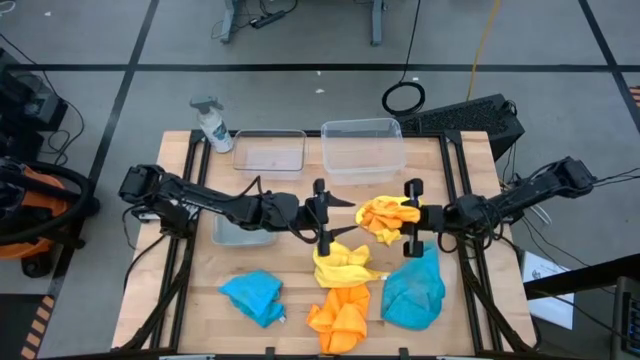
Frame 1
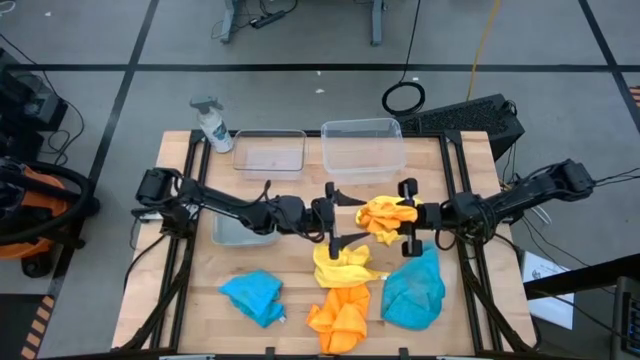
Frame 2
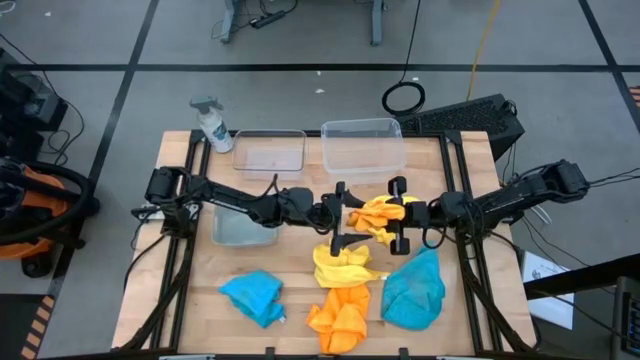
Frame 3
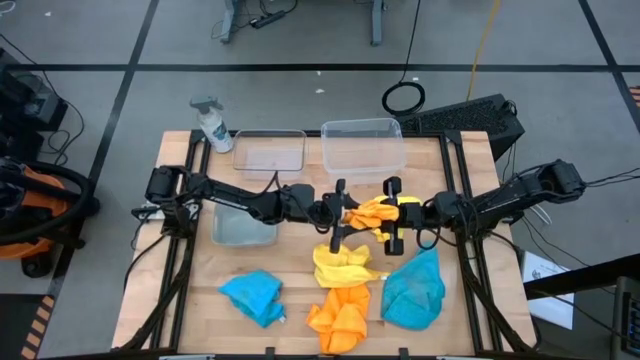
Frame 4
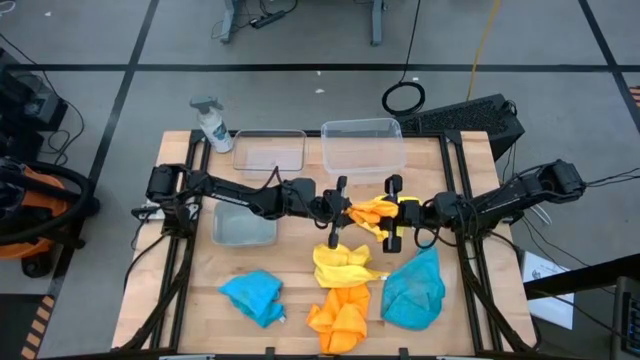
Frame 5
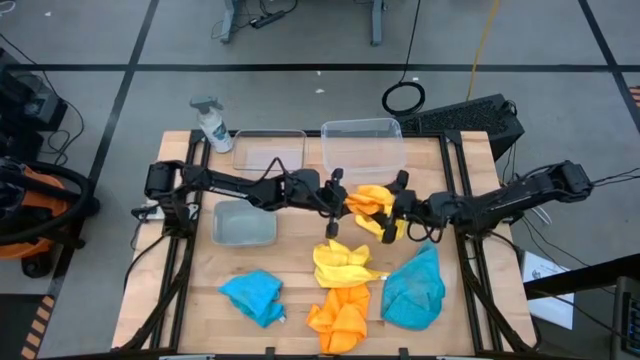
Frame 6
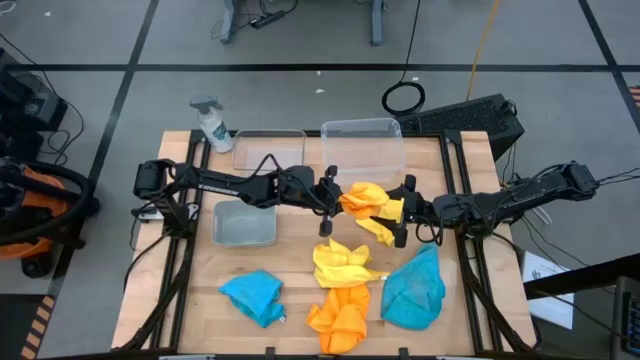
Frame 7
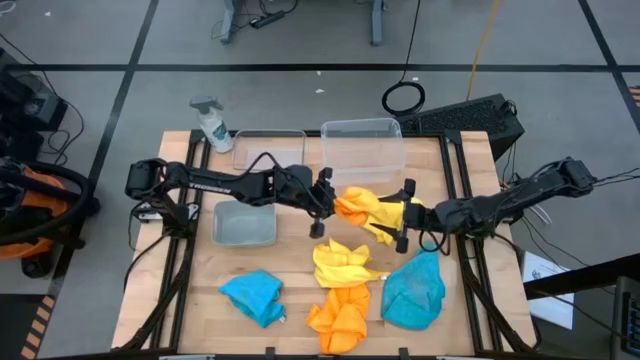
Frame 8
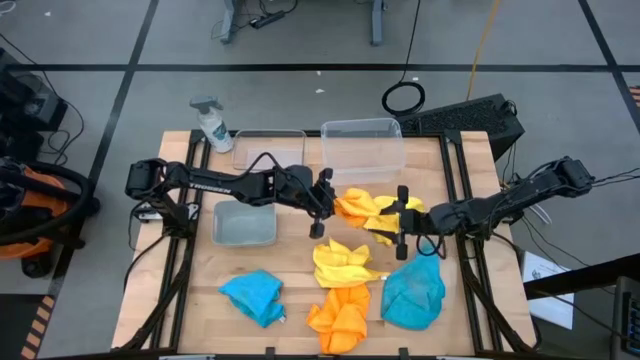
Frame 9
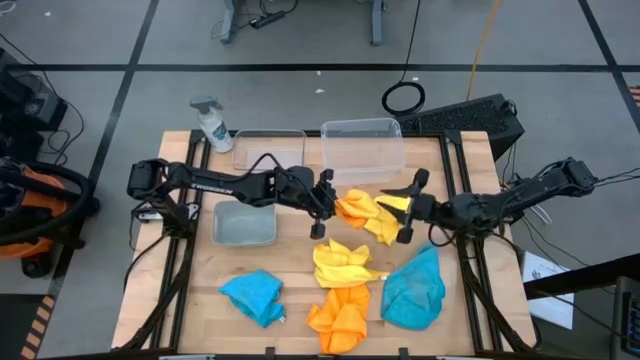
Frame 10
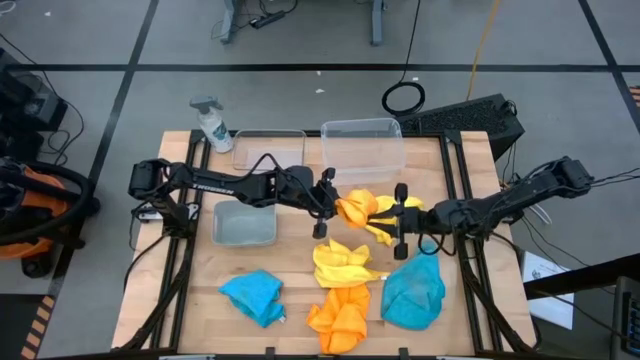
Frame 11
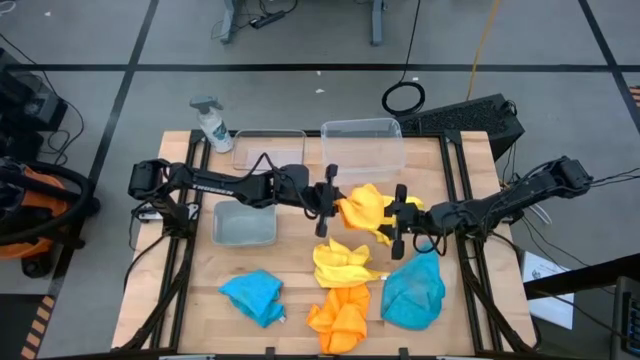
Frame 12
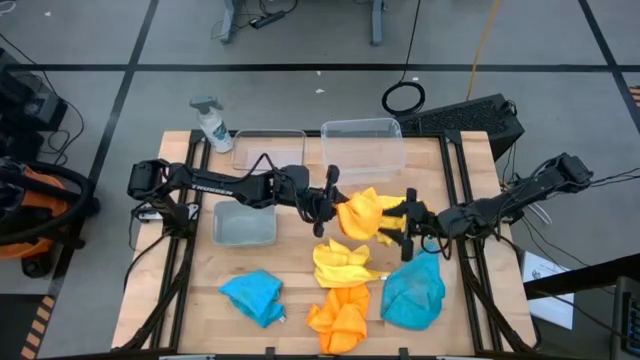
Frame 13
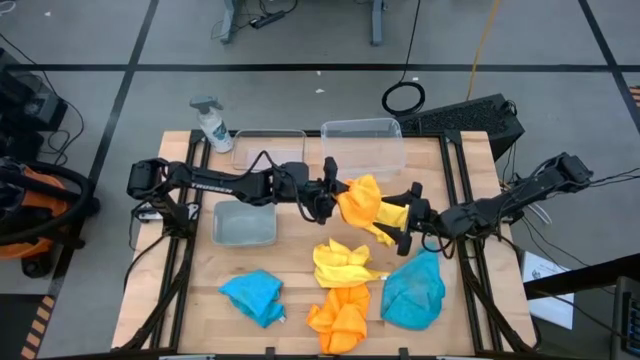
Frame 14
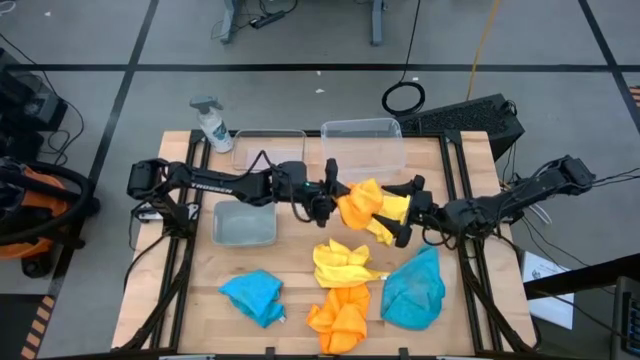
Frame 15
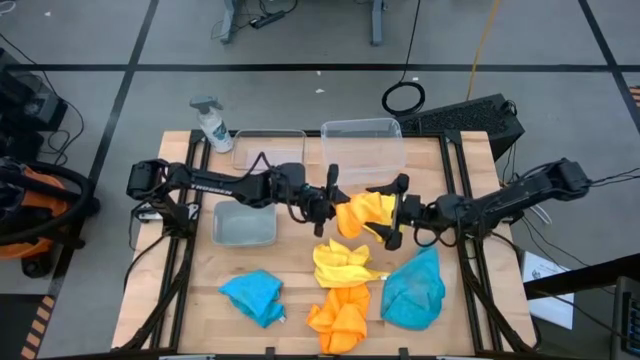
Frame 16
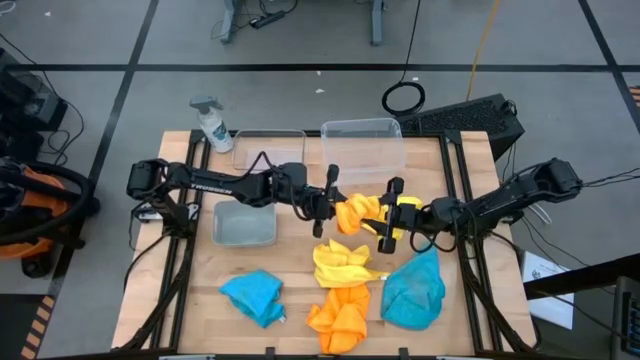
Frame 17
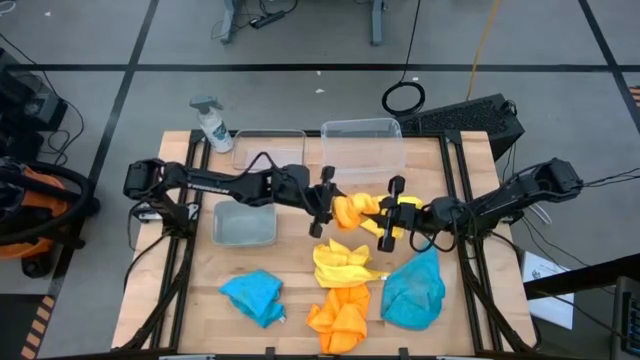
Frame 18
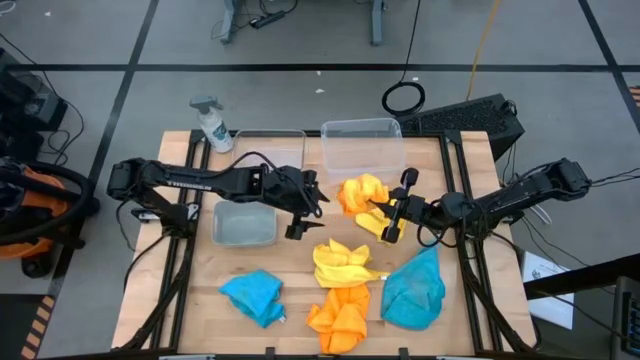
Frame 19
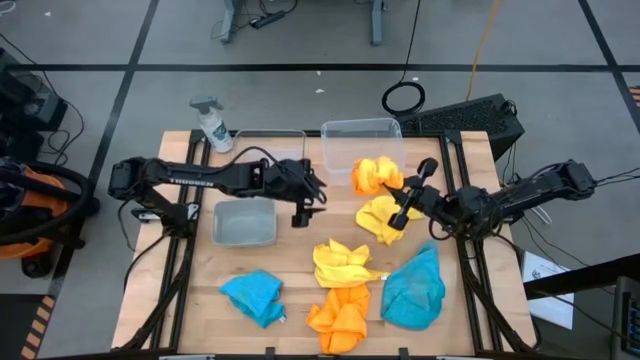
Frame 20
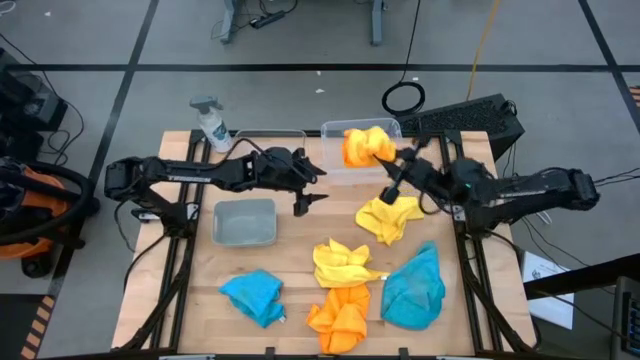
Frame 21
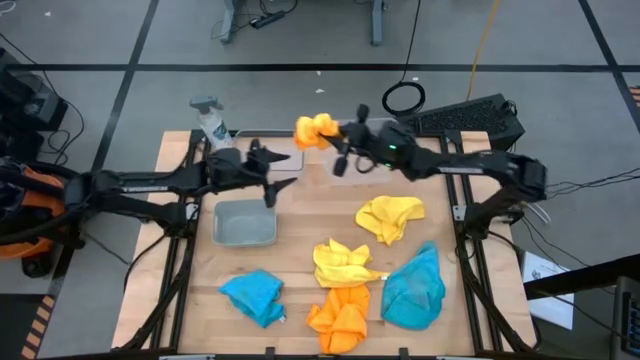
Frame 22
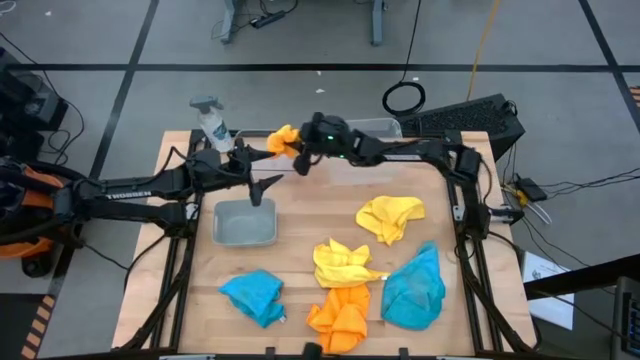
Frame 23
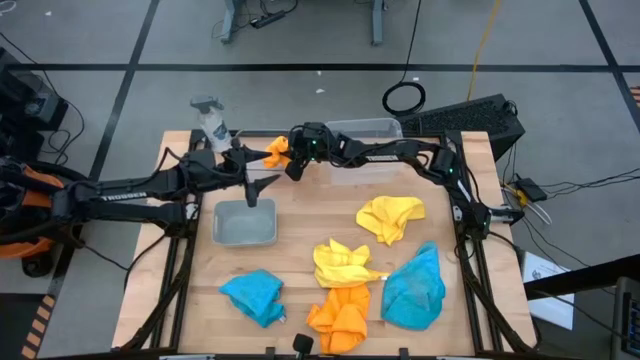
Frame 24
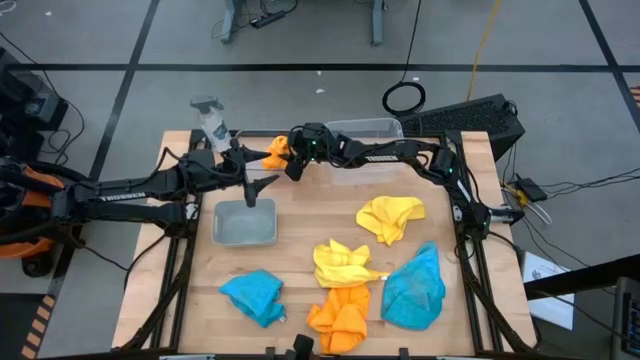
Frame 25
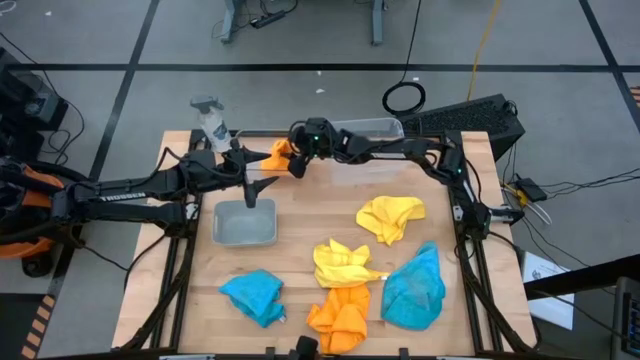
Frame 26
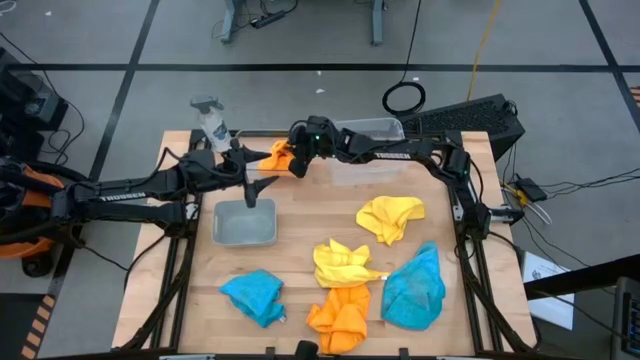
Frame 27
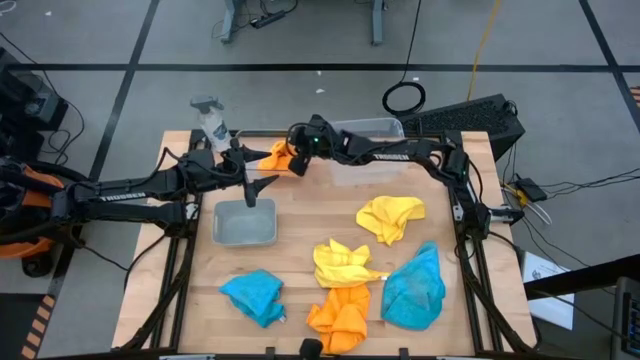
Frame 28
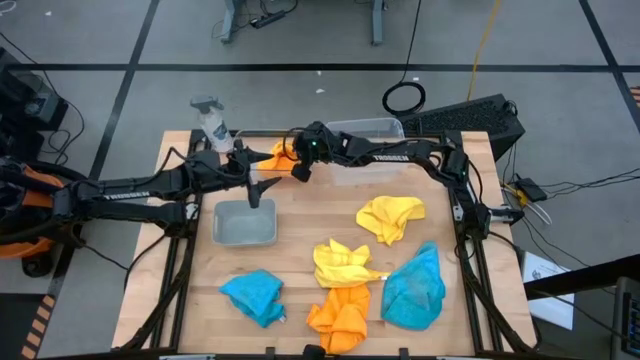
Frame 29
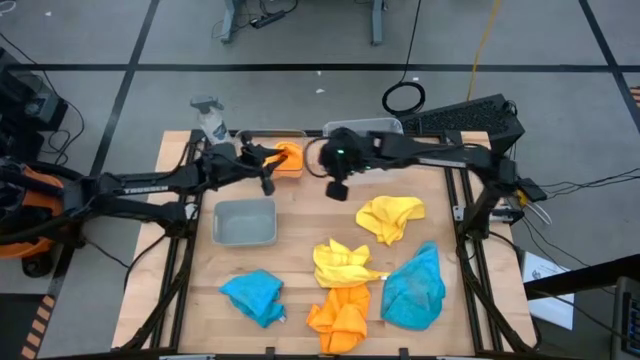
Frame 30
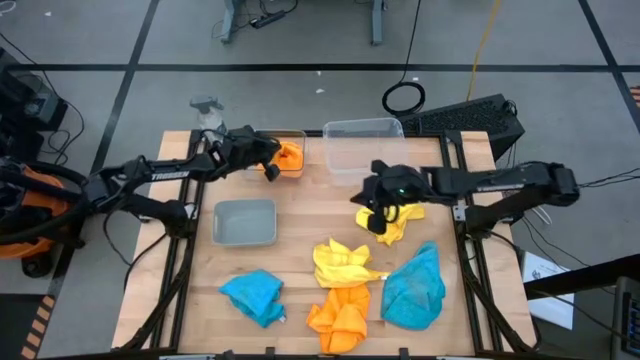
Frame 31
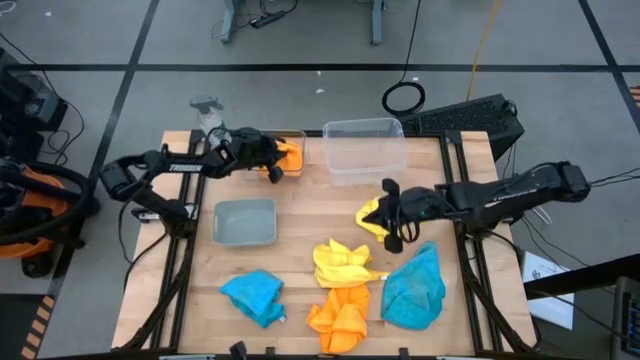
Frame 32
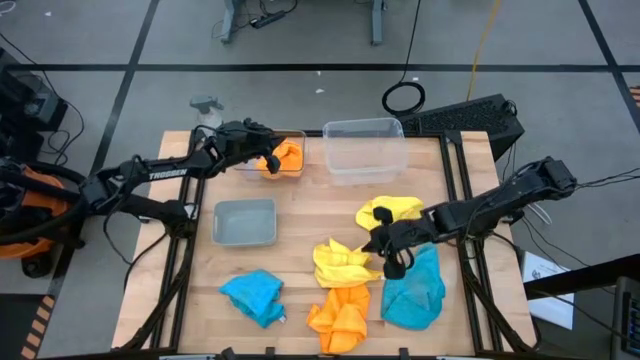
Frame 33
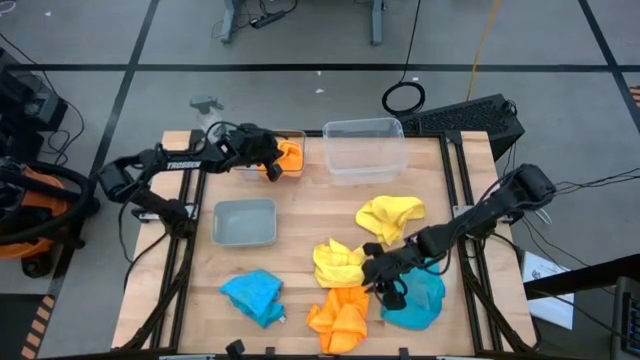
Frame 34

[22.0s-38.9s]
Task: Sort microfiber towel by color & place in baskets
Put the top orange towel into the left transparent bin

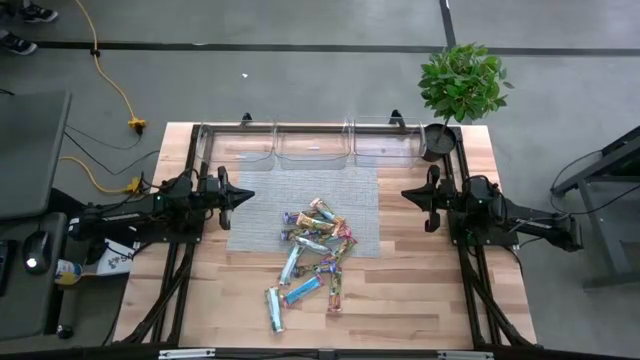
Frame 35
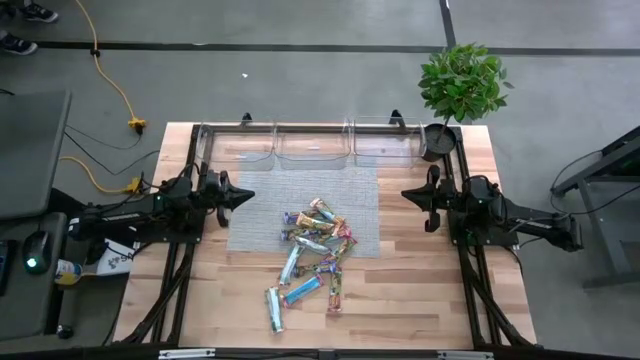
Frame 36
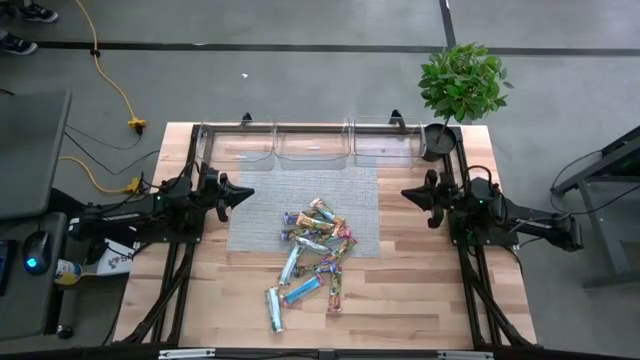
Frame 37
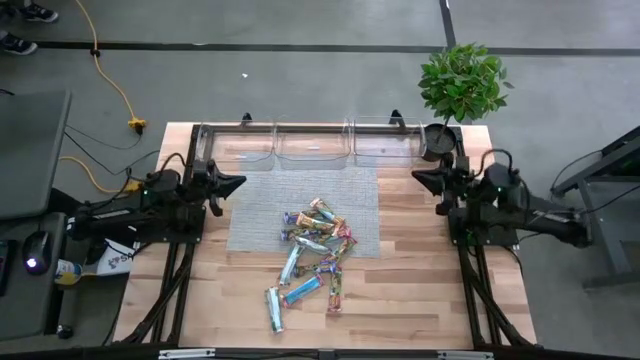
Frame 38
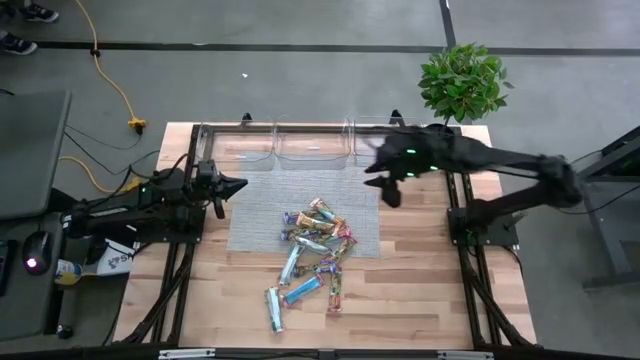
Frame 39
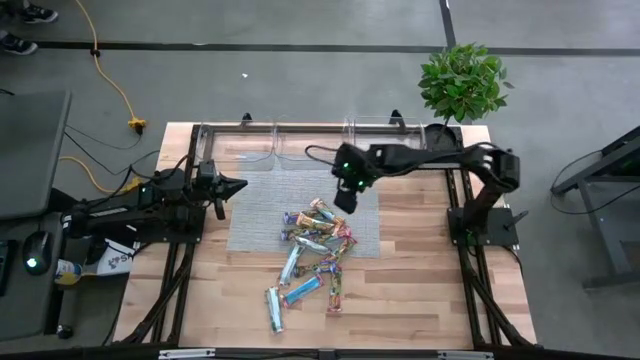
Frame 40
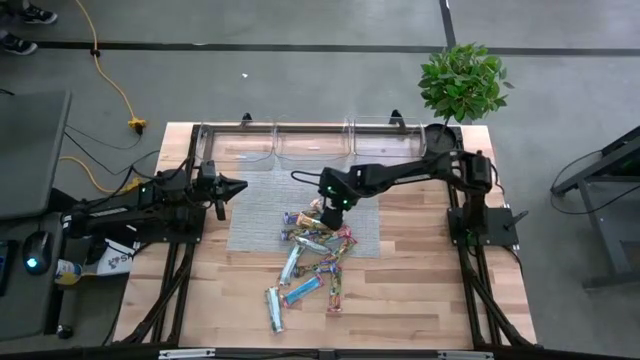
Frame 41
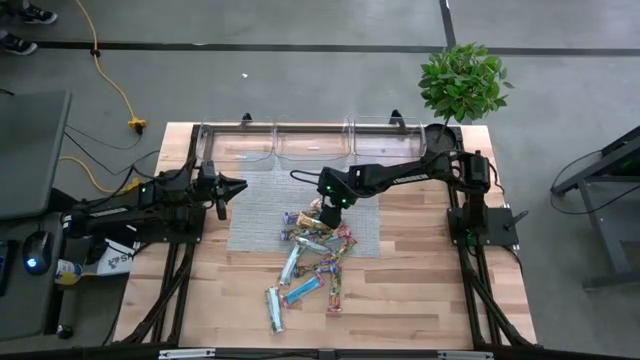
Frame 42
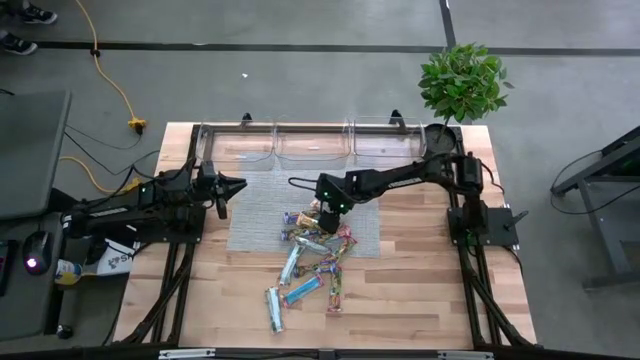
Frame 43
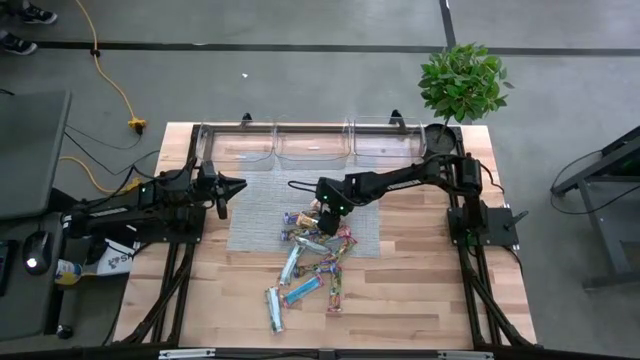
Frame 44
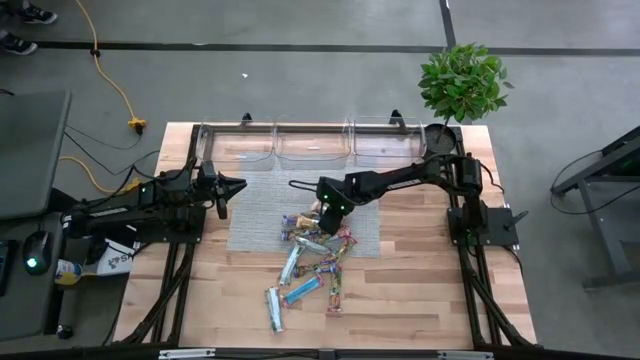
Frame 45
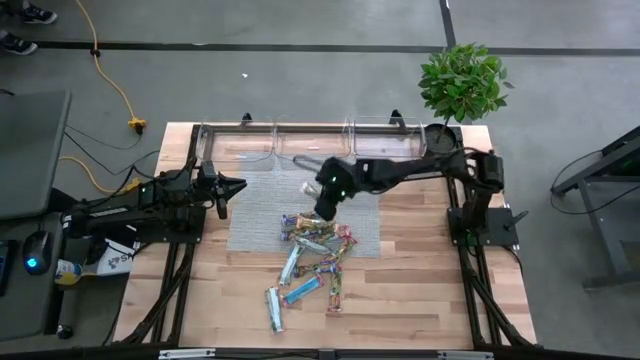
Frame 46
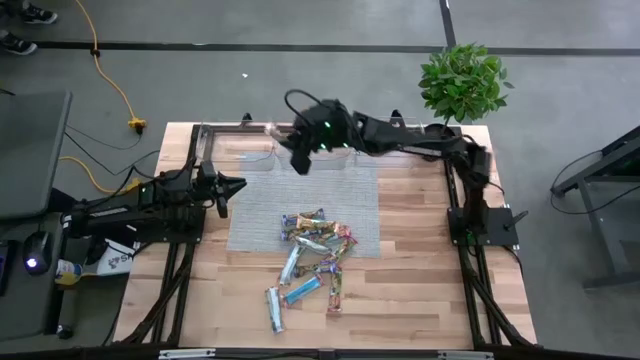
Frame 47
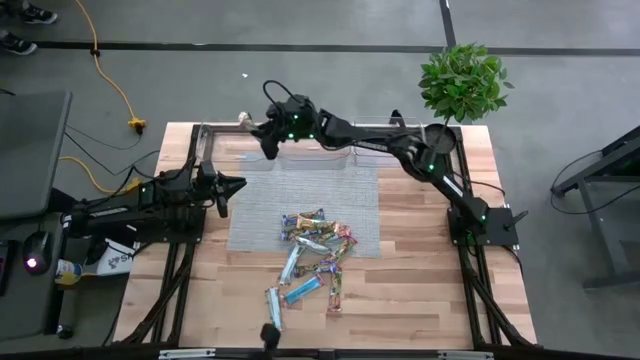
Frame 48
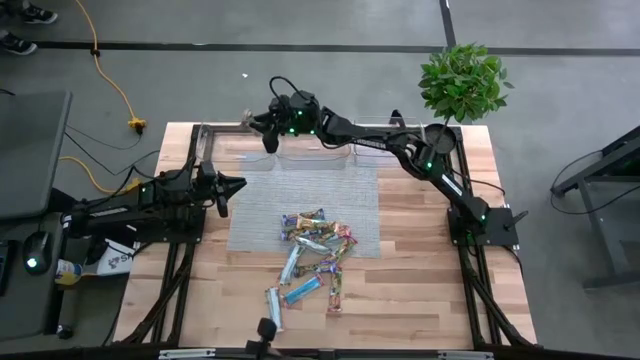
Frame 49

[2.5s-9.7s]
Task: Pick and place Granola Bars by type
Put the yellow granola bar into the left transparent bin
